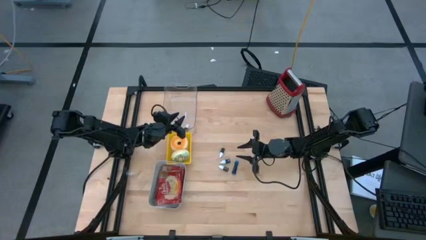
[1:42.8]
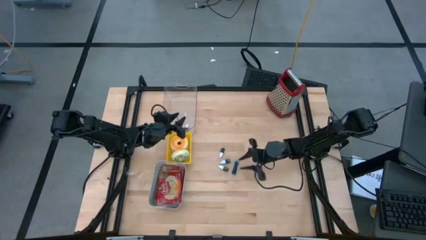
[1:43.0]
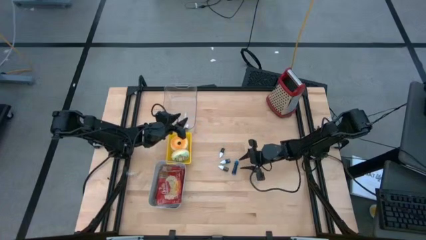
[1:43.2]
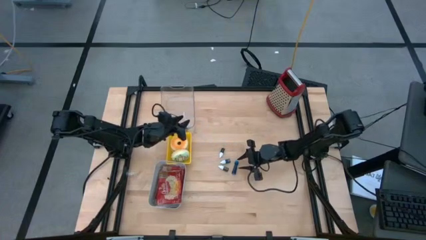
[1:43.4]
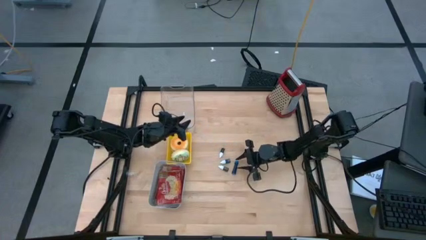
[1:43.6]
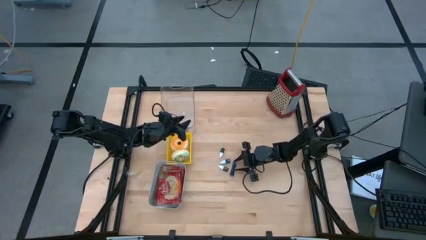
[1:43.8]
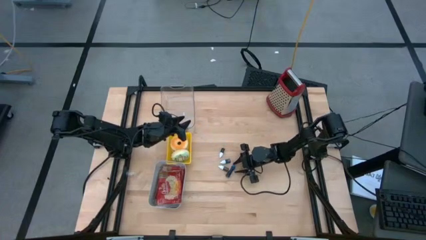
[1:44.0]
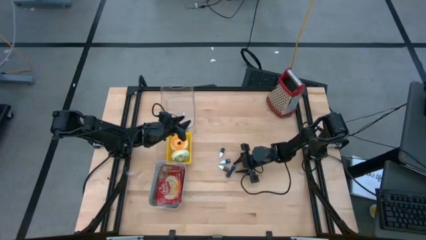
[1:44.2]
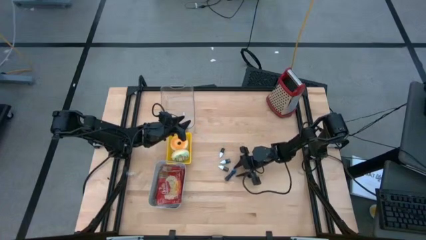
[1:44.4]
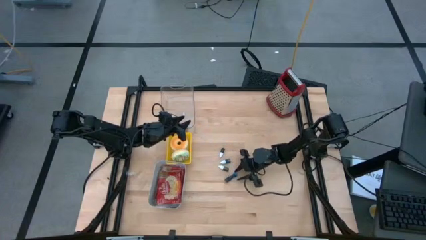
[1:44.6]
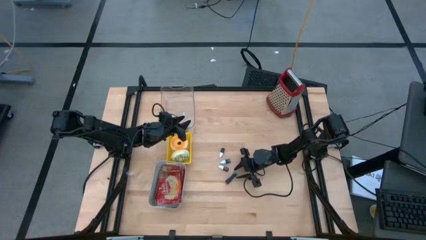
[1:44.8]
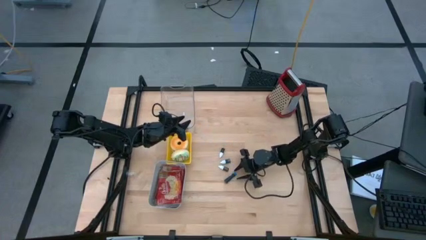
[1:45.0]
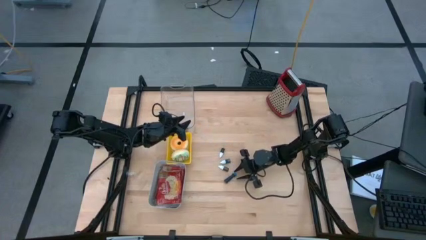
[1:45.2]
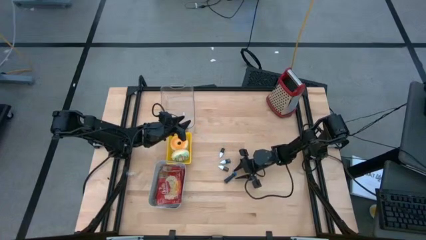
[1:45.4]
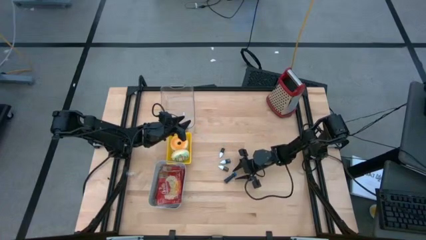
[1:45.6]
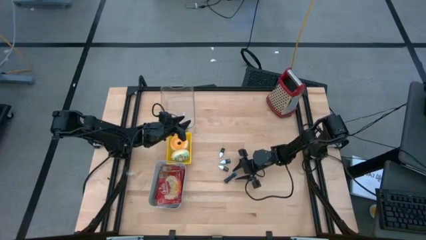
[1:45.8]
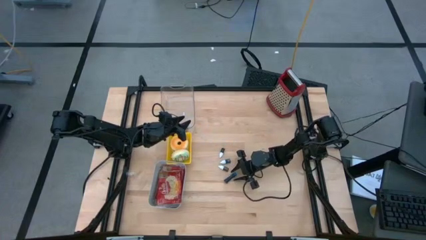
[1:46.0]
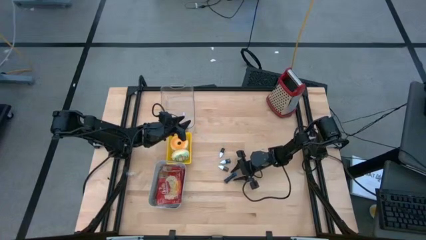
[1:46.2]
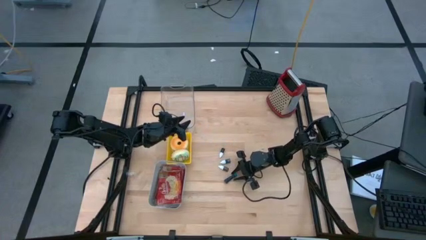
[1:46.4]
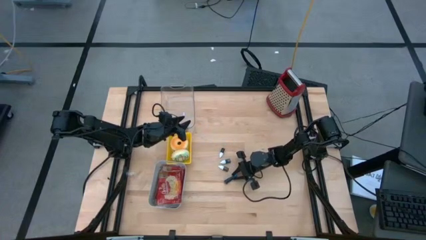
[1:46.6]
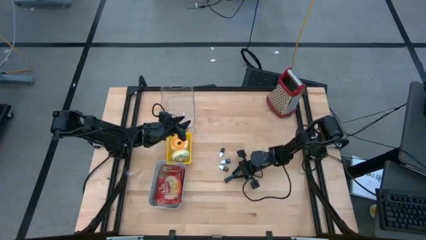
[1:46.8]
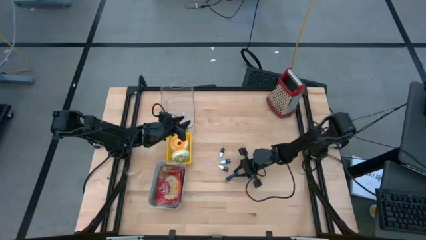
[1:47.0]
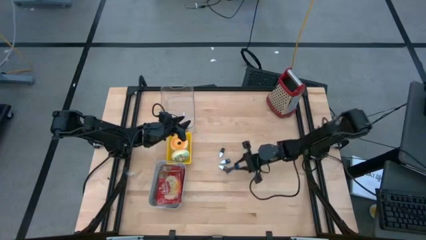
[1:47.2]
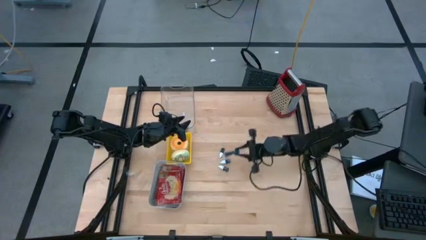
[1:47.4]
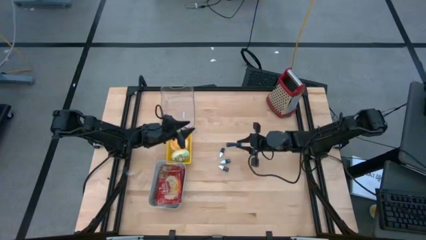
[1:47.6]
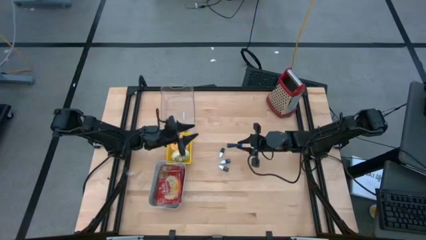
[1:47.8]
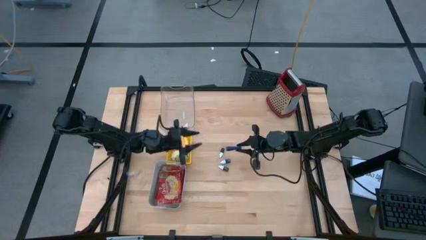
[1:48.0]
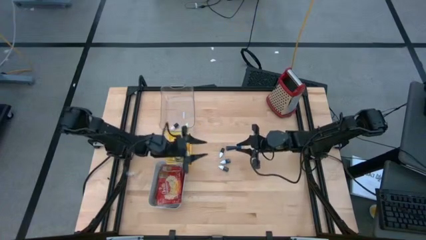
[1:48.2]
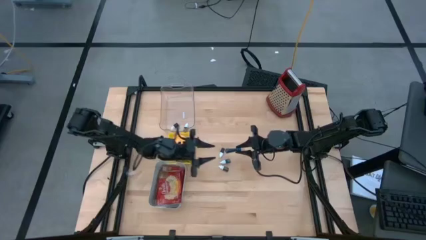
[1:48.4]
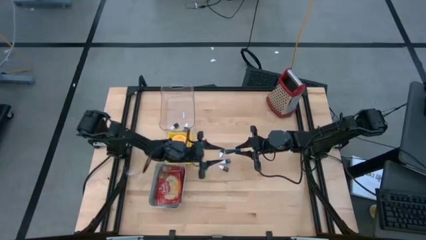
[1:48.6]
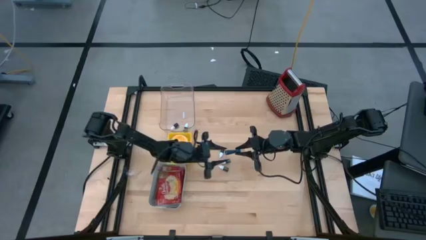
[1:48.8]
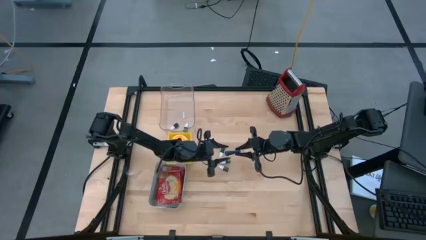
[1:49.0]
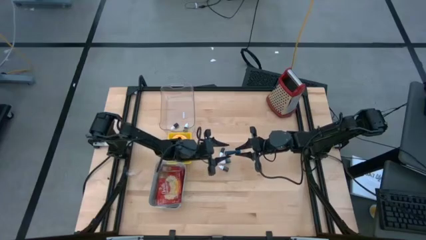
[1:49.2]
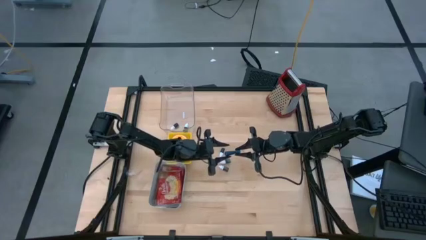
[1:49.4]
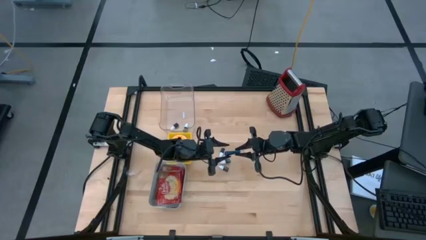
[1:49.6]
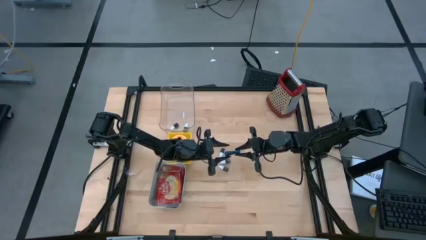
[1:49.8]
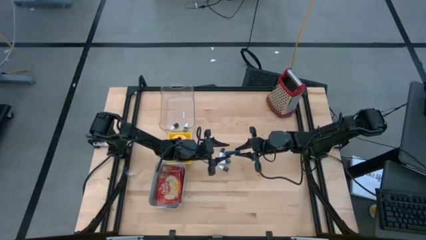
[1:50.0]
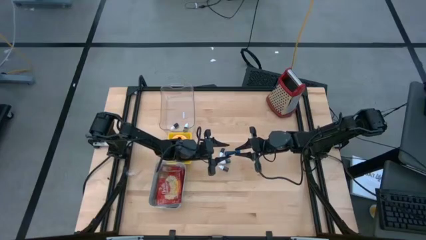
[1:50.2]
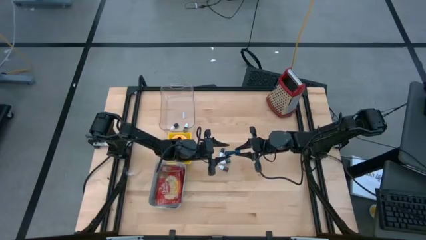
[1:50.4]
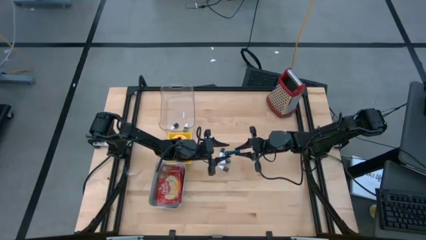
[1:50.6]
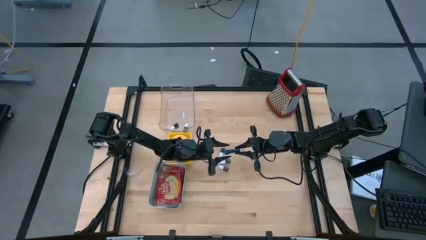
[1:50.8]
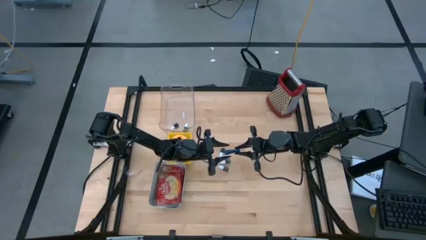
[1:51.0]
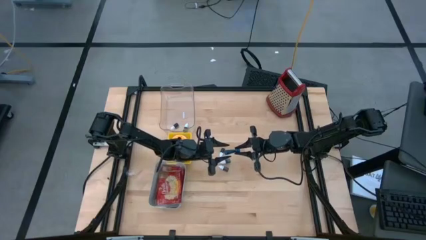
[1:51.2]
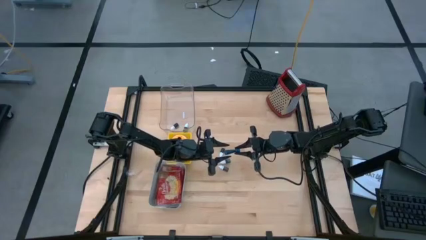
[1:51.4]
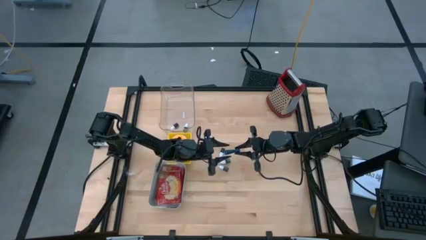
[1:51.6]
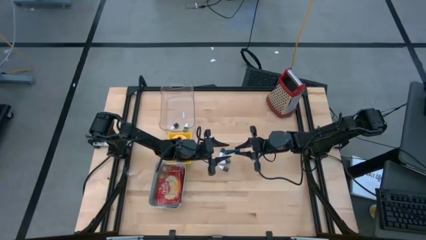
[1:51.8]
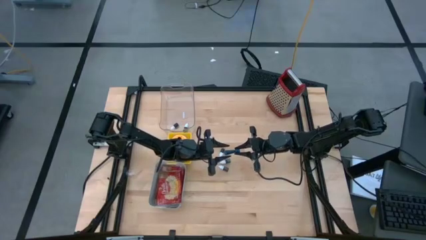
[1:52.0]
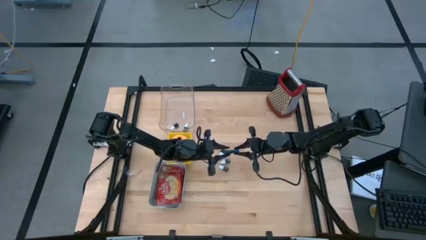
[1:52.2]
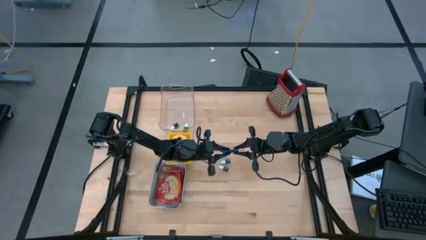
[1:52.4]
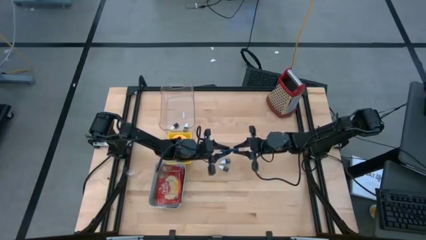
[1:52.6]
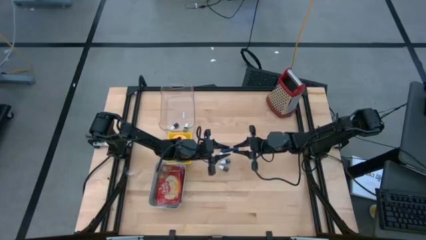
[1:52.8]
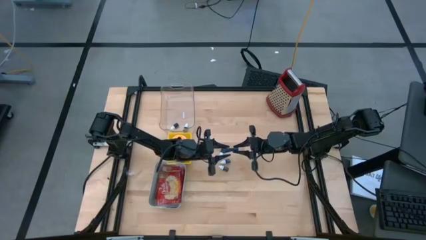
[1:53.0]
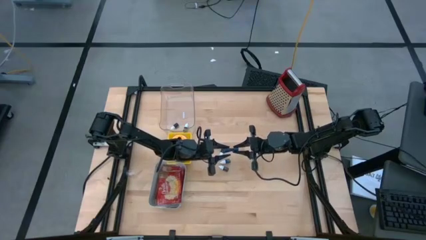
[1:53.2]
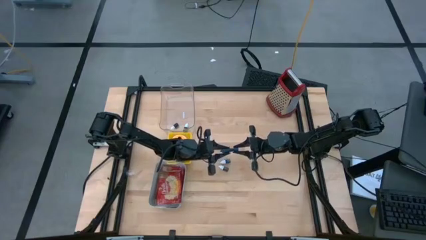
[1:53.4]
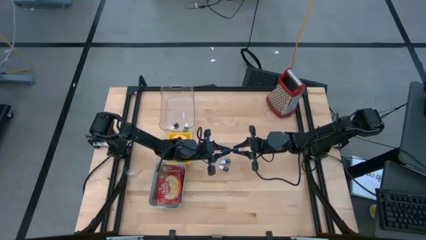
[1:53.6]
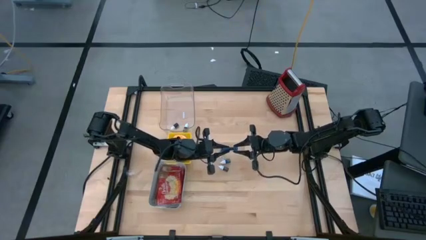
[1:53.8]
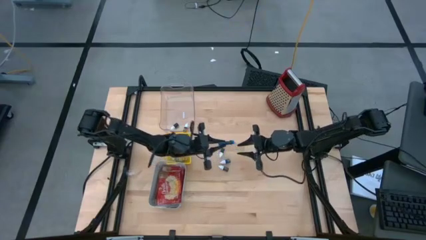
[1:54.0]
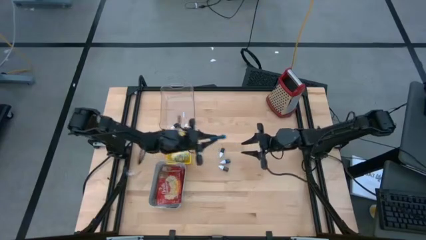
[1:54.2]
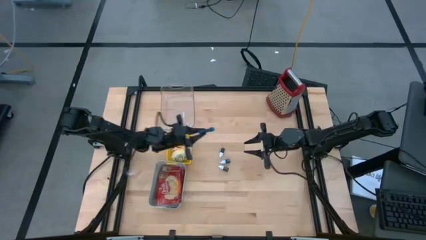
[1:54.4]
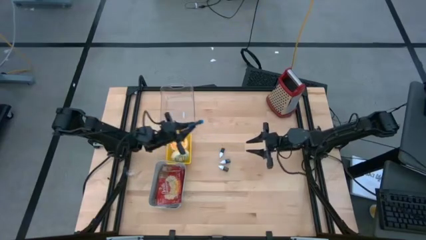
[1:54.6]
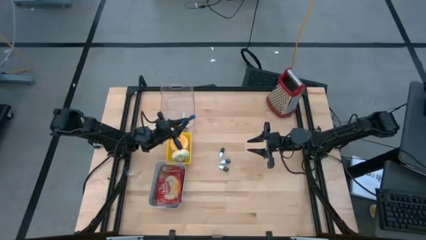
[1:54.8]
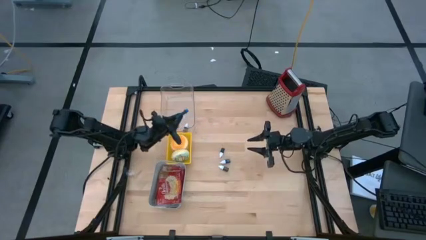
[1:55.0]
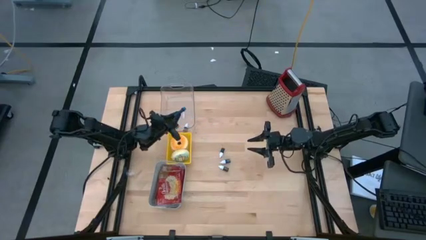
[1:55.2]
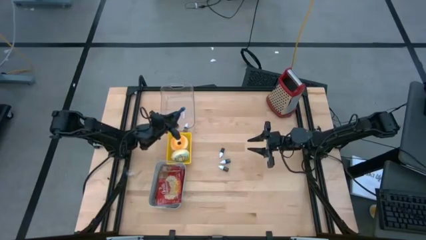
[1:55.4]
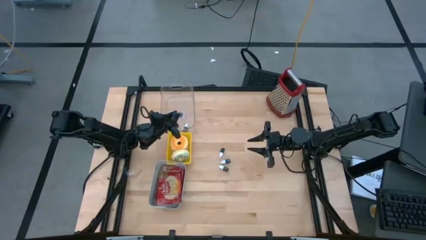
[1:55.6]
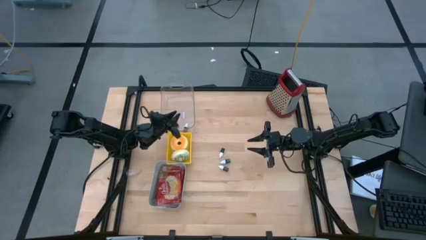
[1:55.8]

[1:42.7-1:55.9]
Task: Pick & Place Food Item
Put the right blue food coloring bottle into the transparent bin

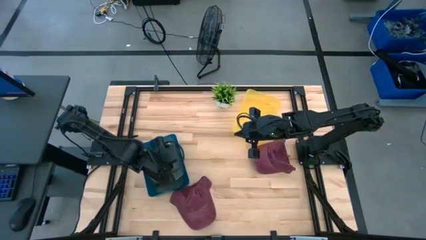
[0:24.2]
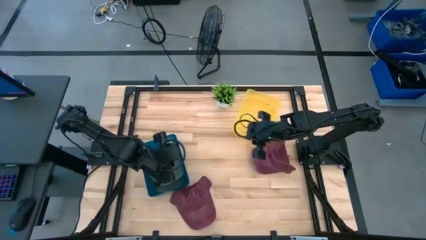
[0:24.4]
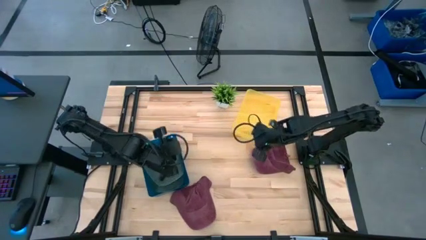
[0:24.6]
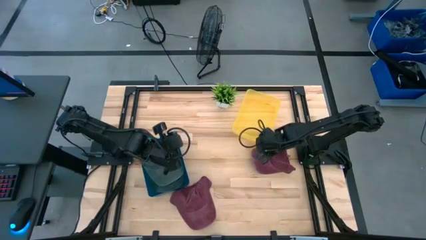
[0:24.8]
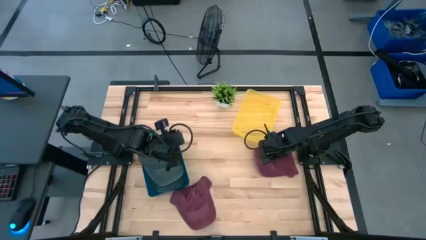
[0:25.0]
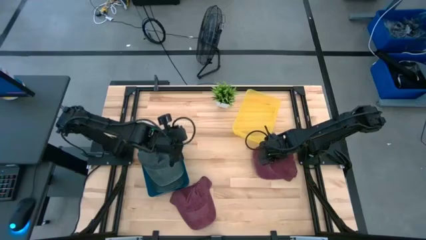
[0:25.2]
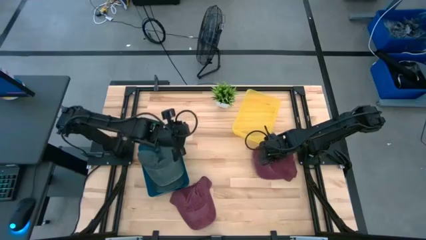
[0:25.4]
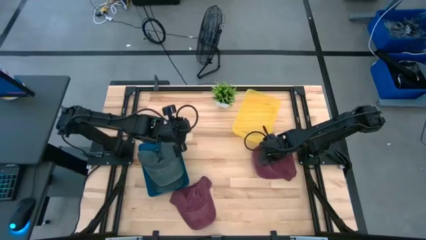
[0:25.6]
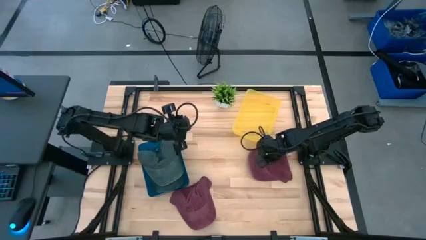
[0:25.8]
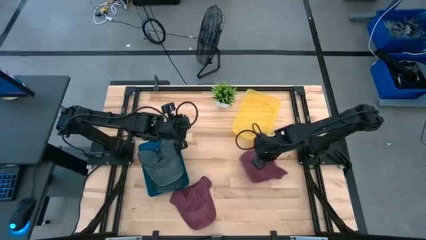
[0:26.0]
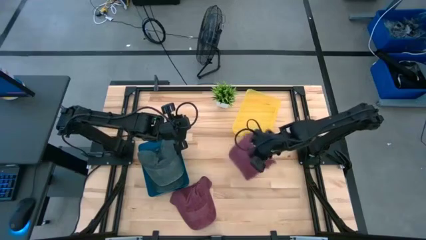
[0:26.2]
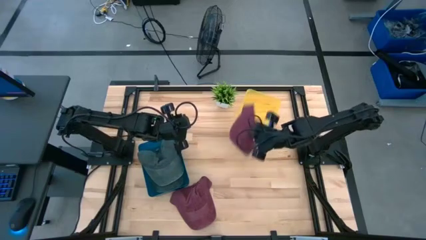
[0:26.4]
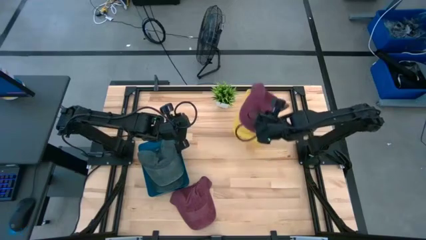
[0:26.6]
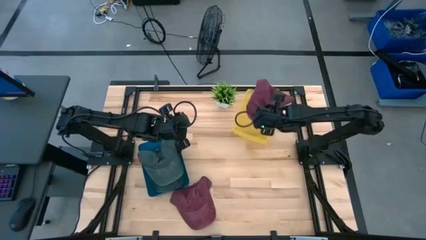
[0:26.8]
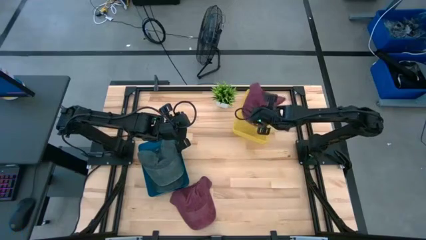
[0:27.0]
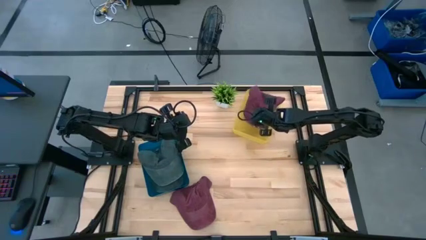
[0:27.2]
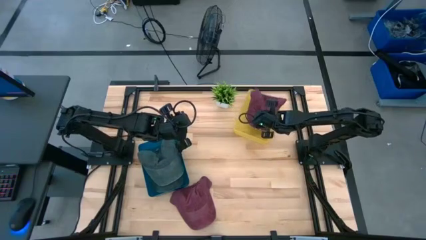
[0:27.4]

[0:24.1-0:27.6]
Task: Pick & Place hat
Put the right red cap into the yellow bin
